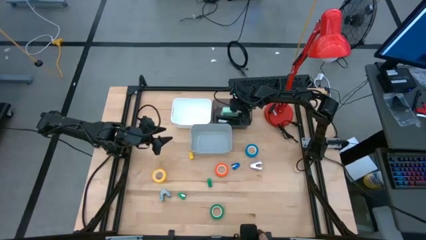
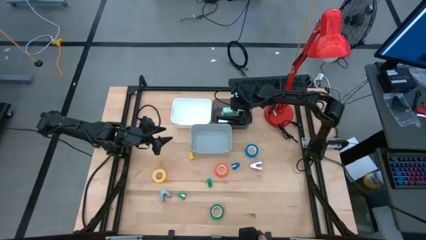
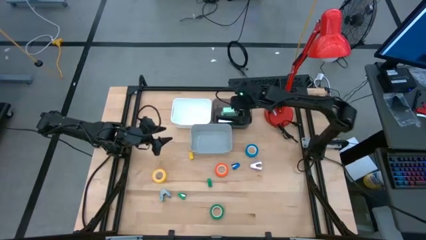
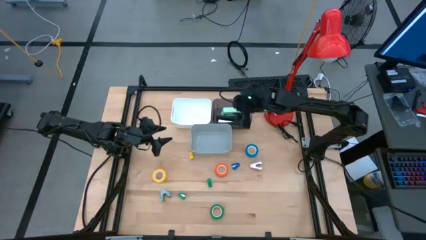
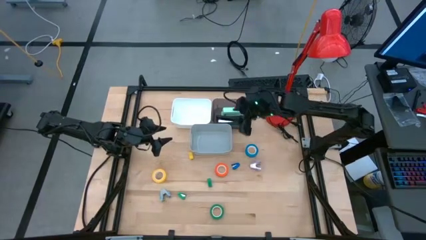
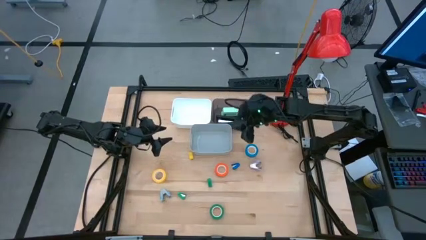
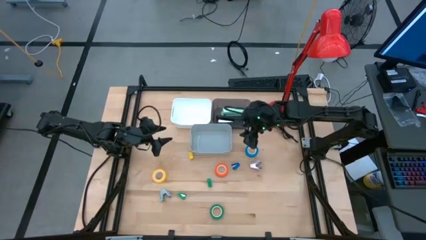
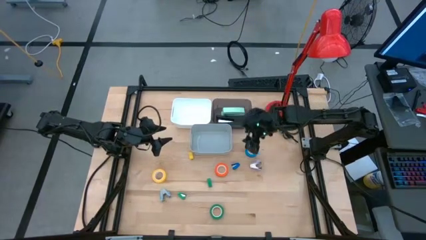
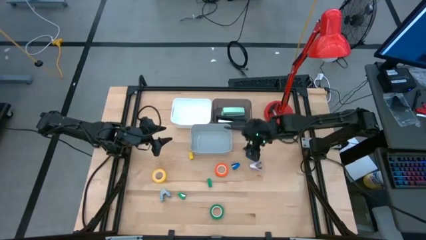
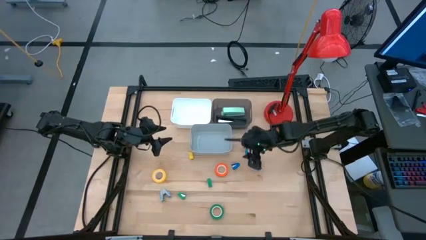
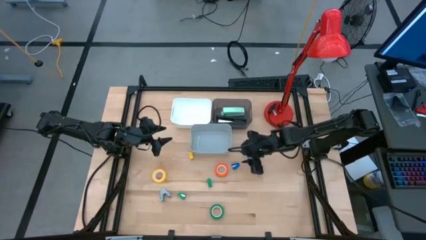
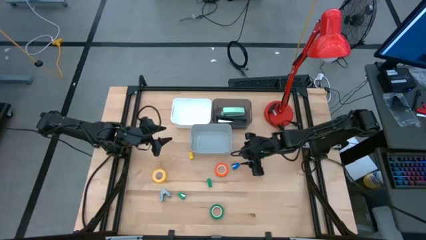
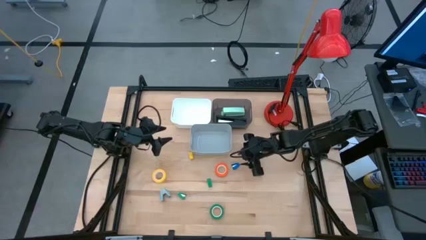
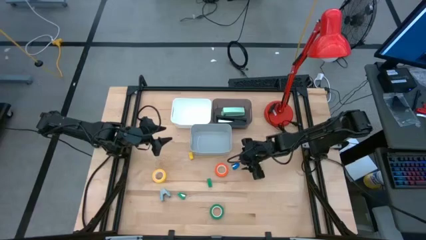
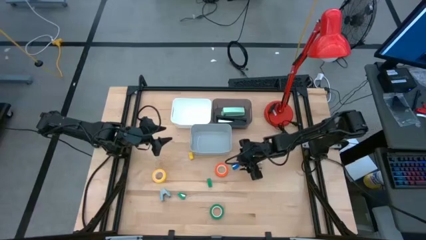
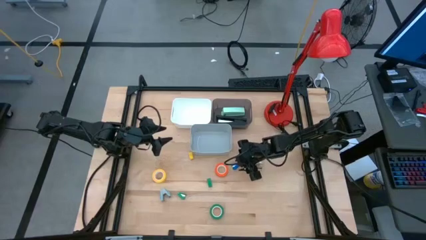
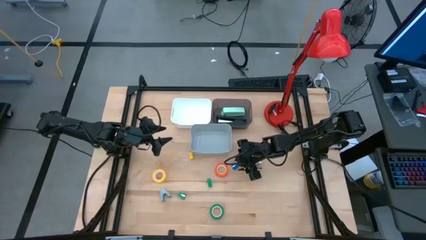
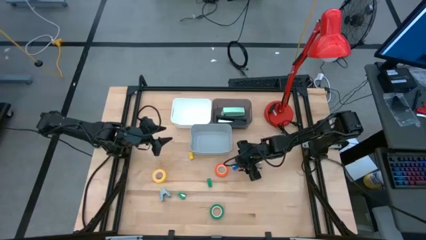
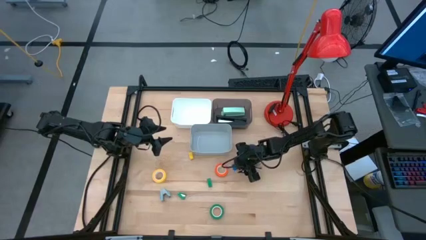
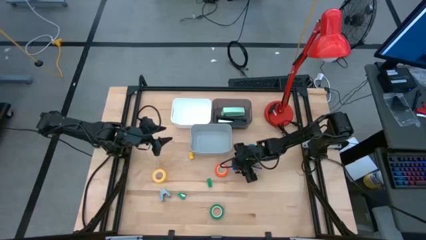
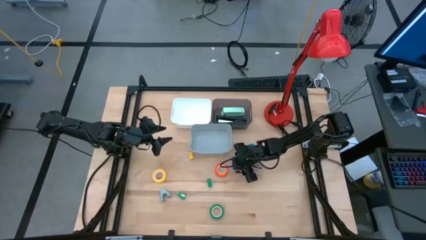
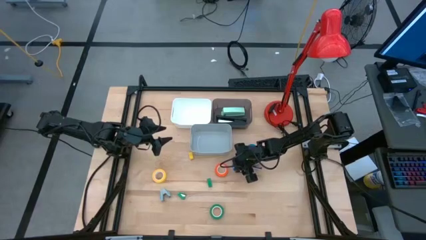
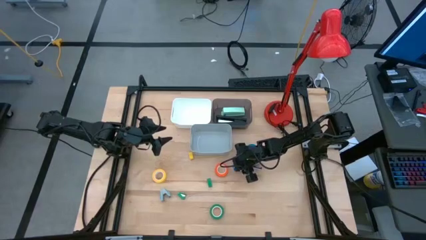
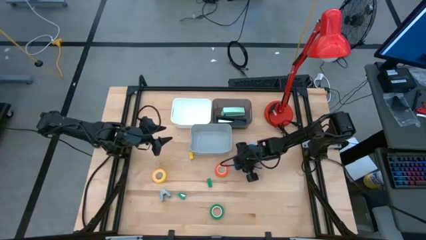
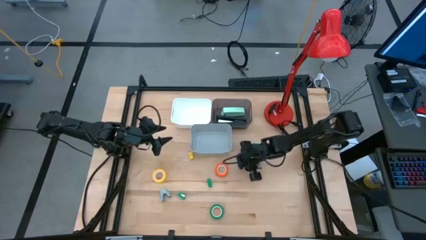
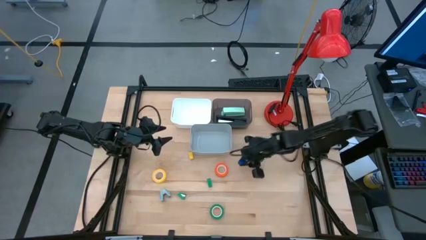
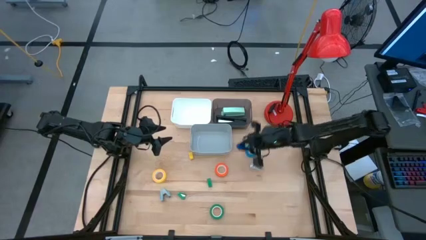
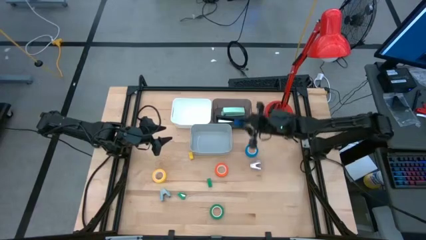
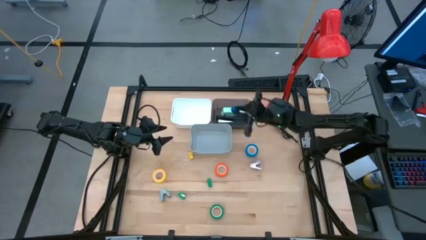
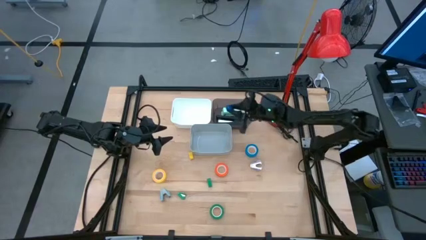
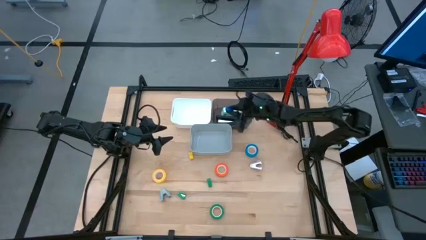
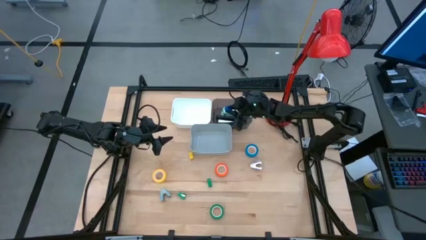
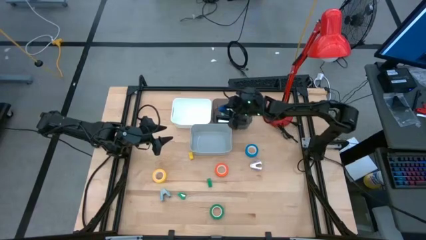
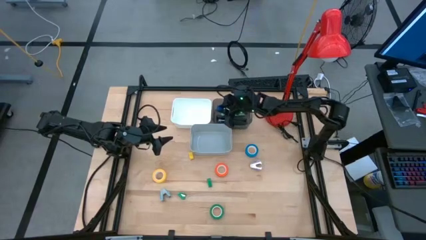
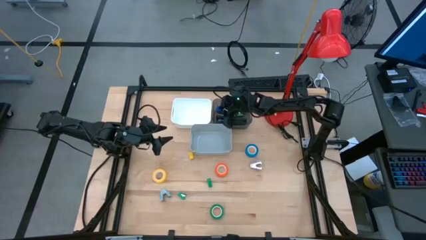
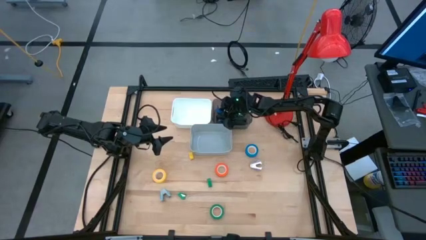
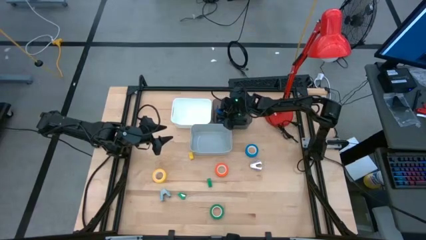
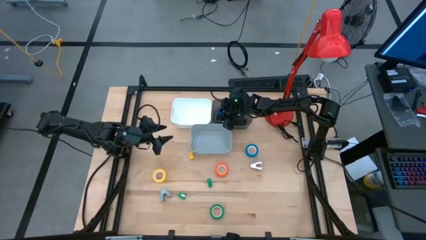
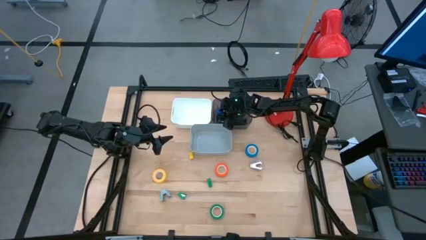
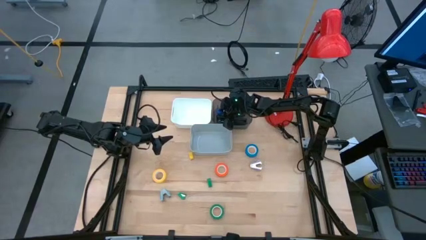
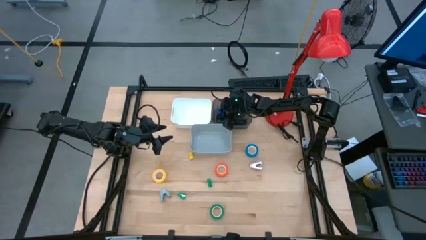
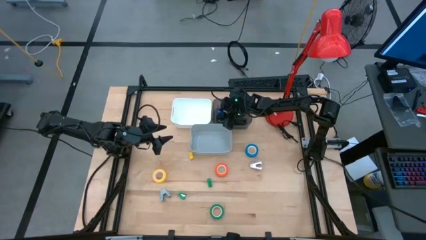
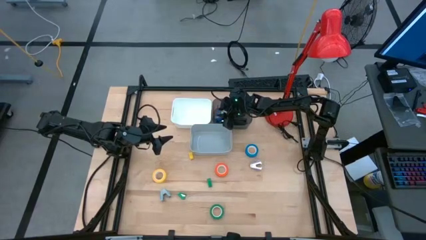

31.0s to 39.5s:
Task: Pick and place Stapler, Stapler remover, tape
Put the blue stapler into the black bin

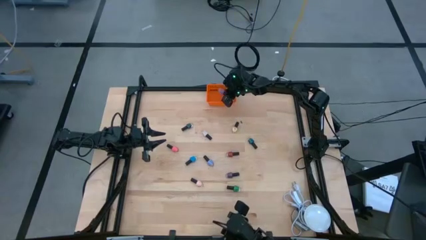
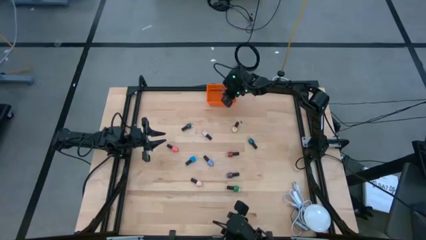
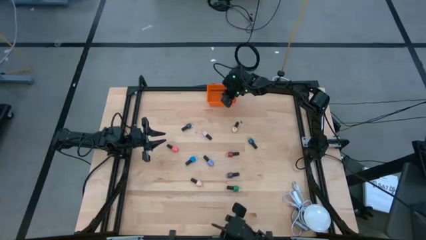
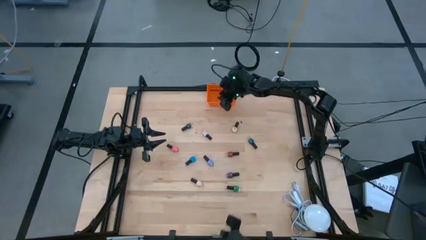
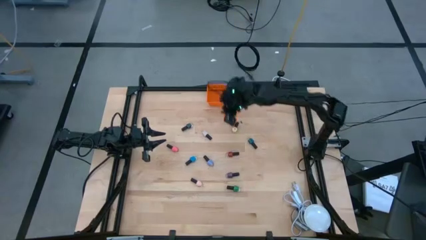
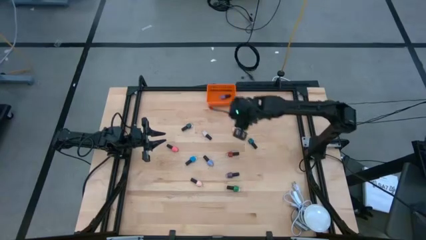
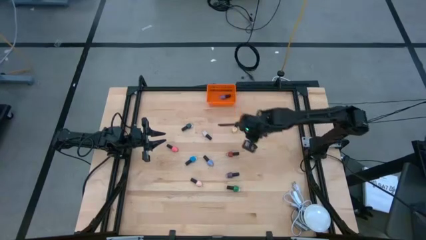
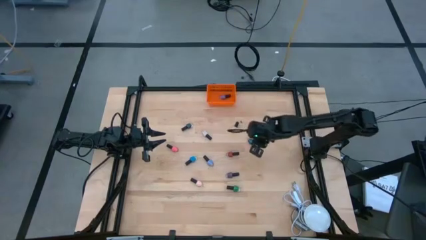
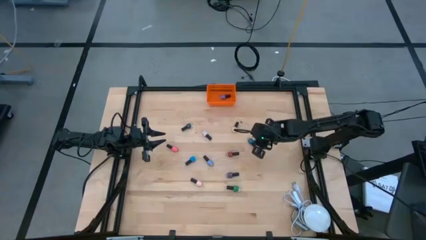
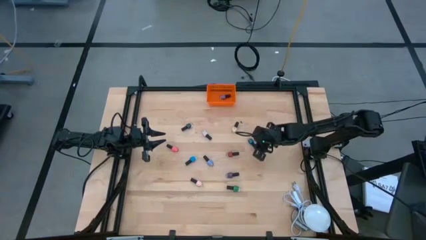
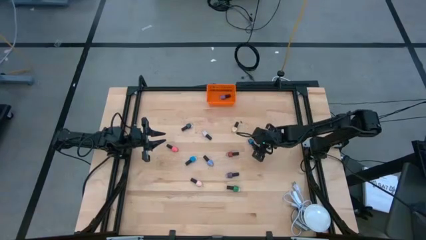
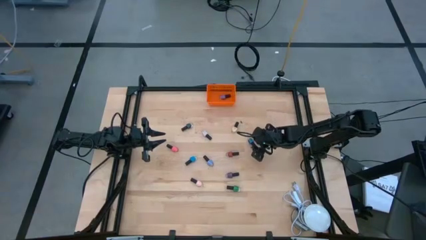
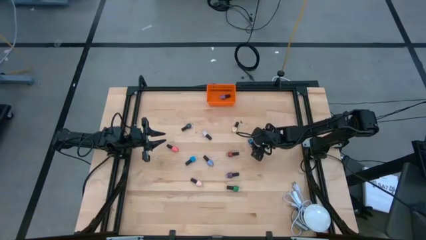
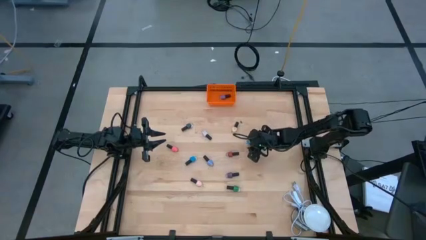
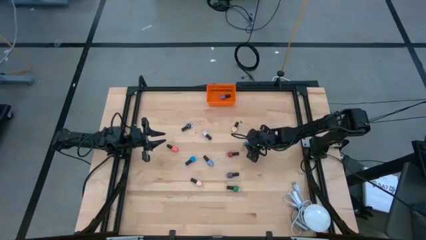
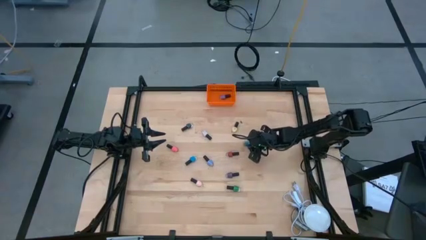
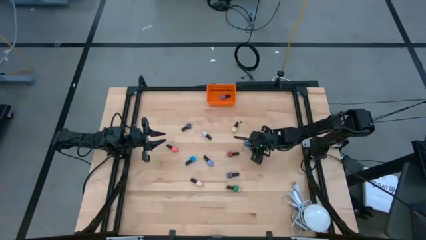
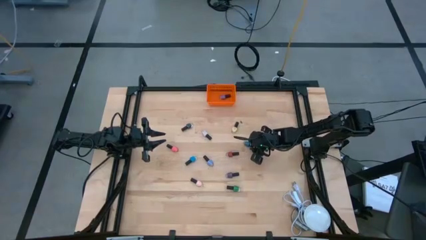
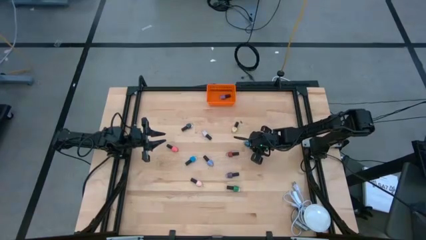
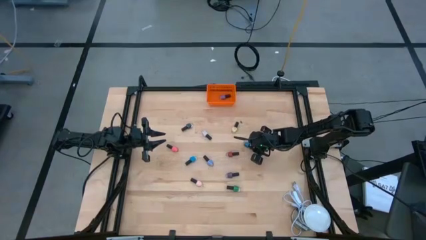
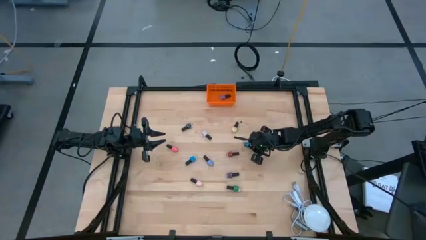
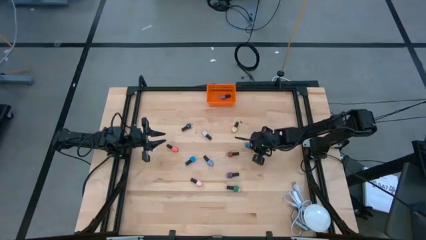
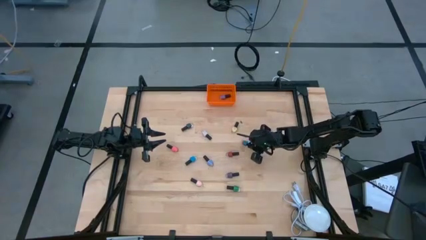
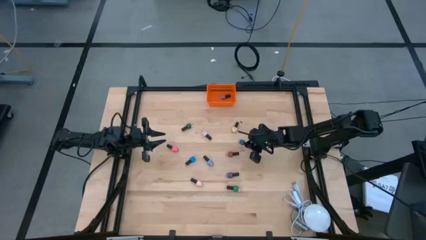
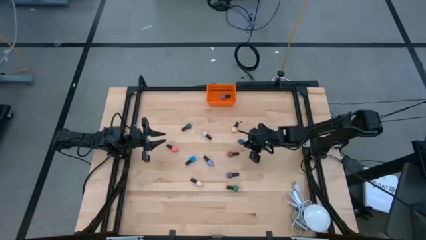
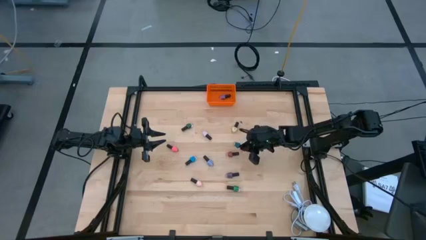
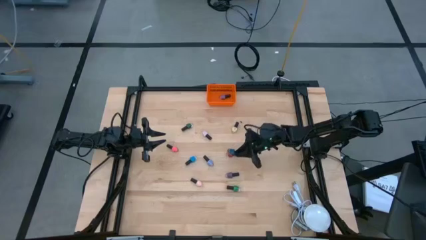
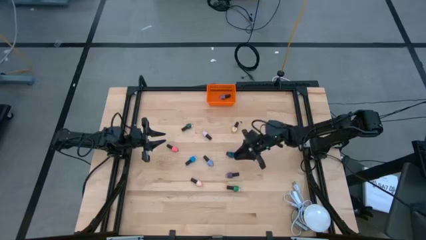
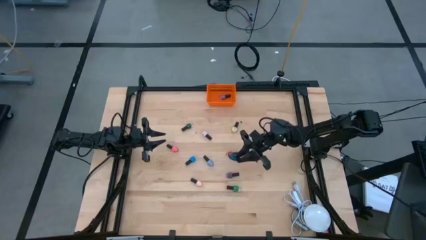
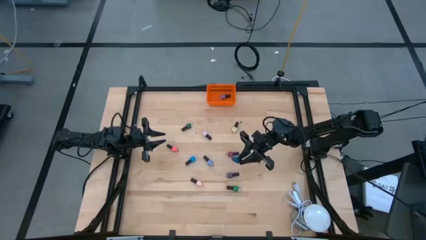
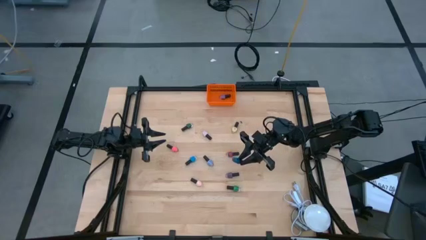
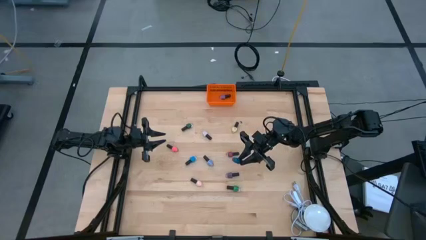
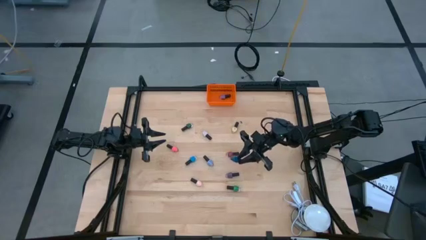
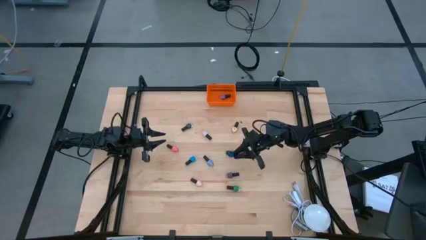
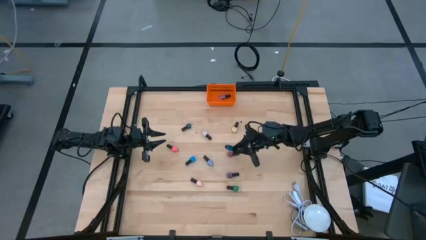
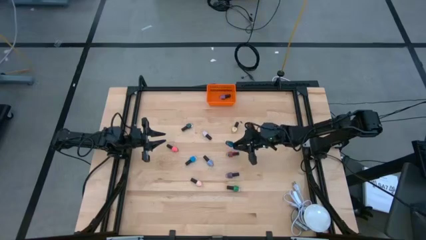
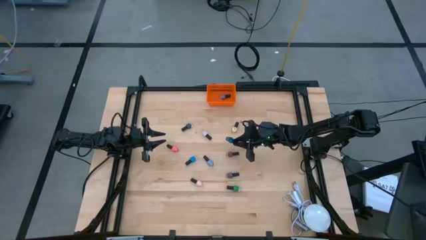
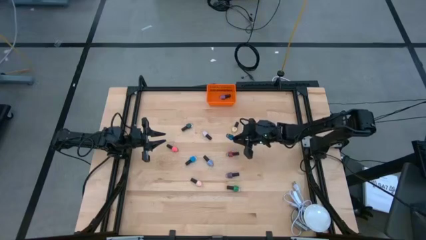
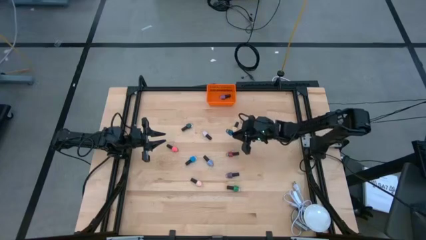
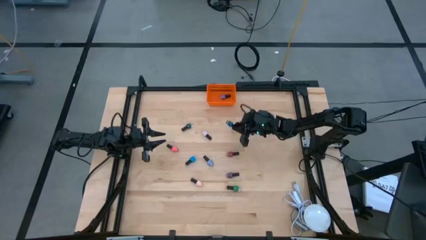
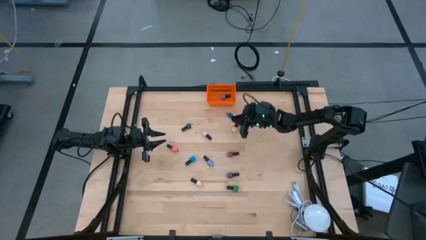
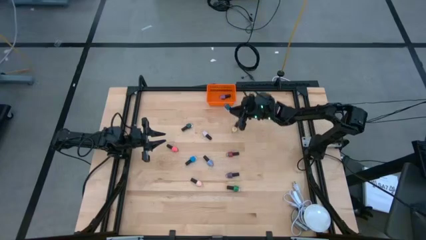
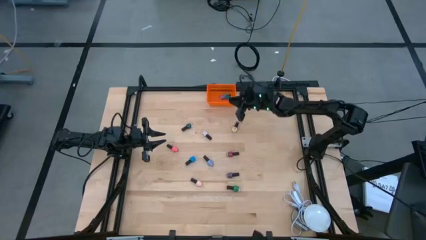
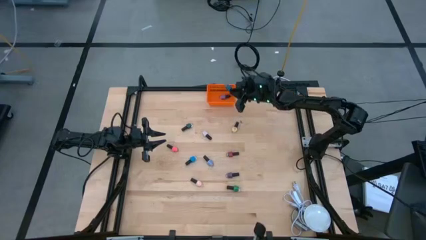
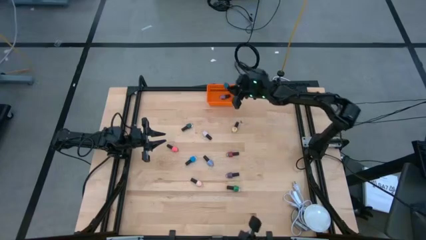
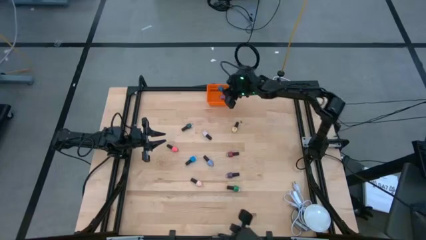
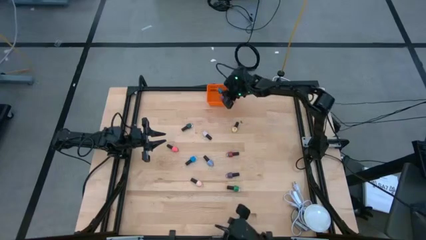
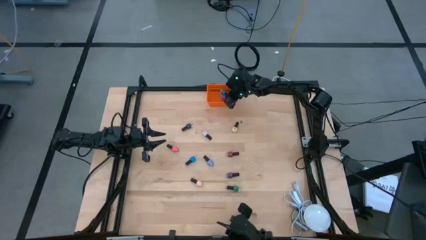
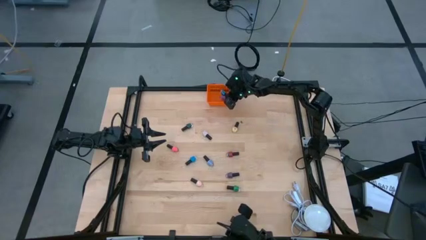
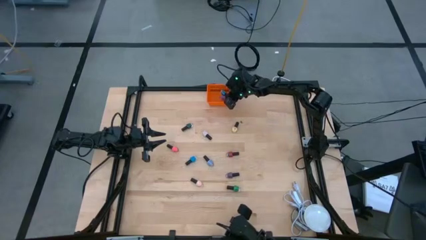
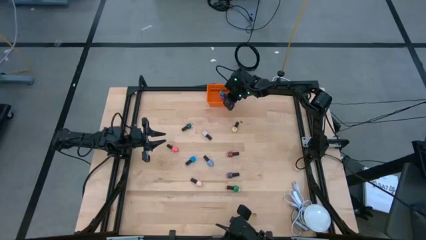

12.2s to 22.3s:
Task: Pick & Place Nail Polish
Put the blue nail polish bottle into the basket
